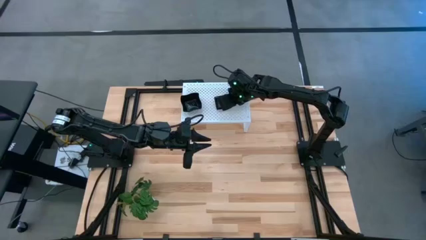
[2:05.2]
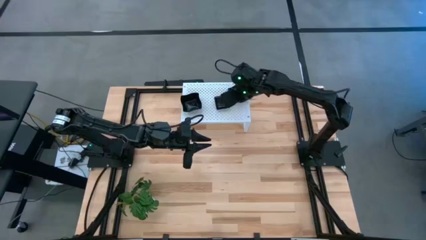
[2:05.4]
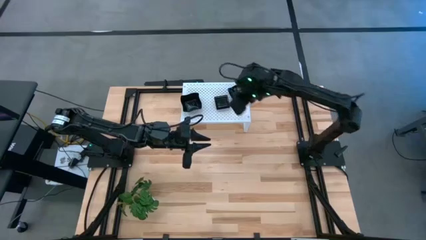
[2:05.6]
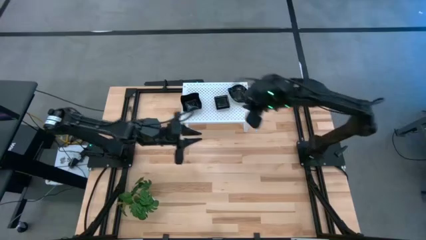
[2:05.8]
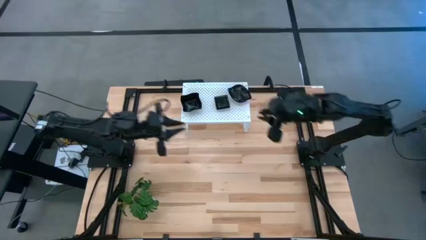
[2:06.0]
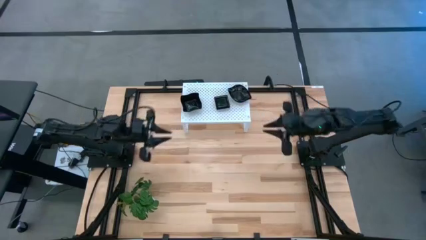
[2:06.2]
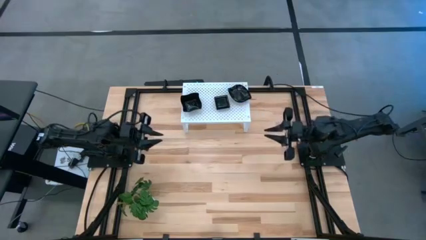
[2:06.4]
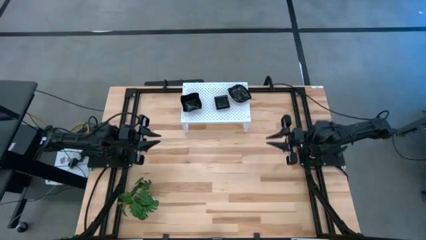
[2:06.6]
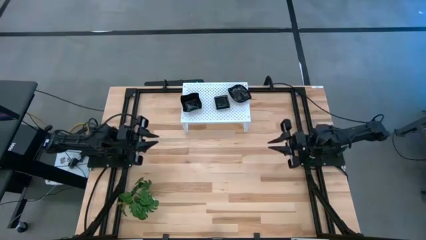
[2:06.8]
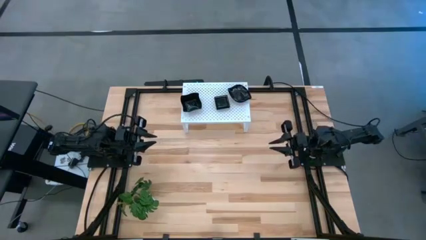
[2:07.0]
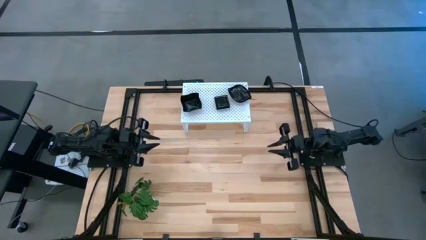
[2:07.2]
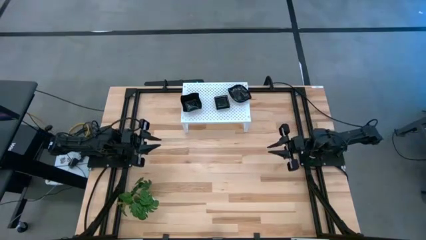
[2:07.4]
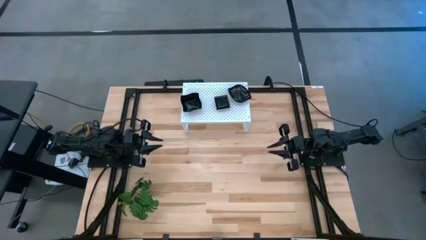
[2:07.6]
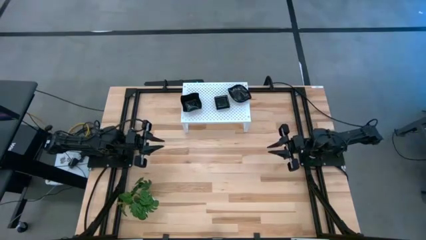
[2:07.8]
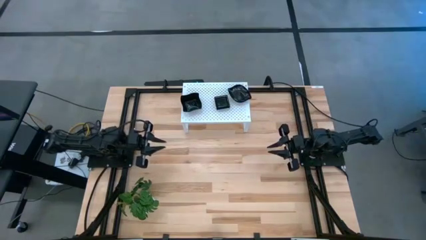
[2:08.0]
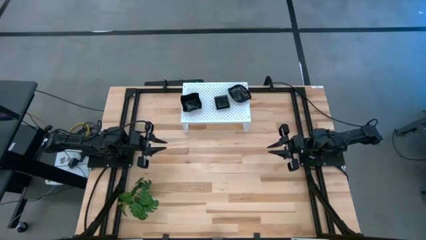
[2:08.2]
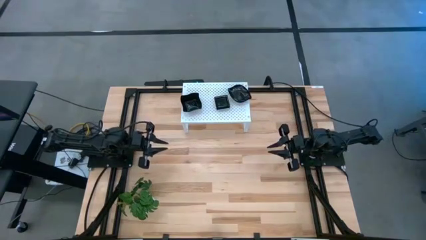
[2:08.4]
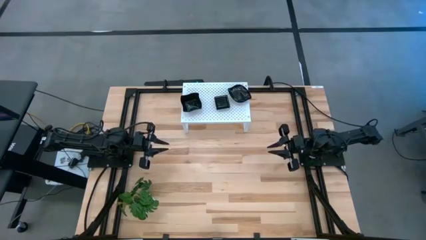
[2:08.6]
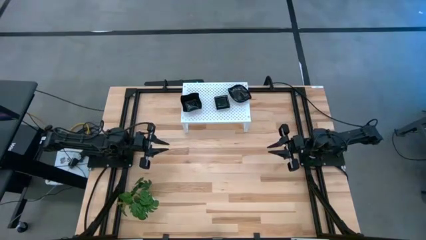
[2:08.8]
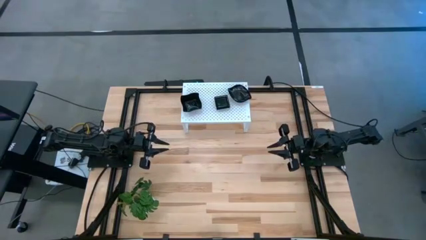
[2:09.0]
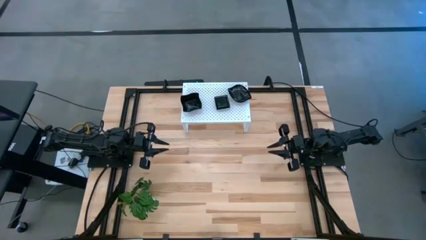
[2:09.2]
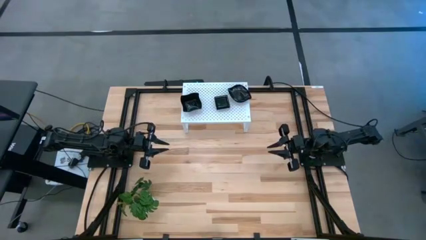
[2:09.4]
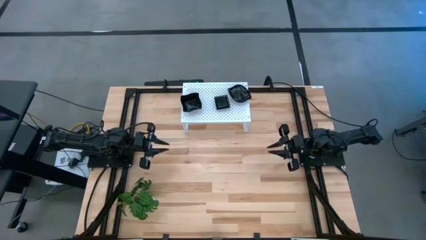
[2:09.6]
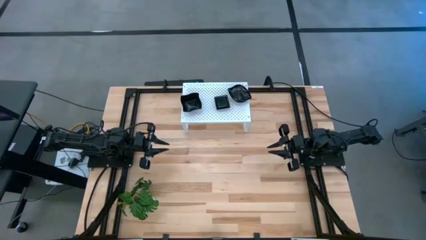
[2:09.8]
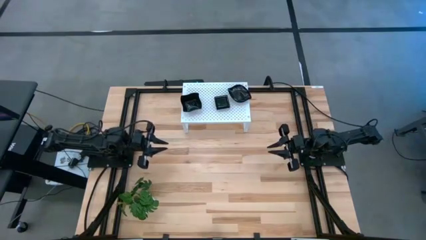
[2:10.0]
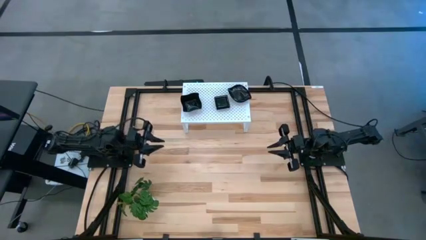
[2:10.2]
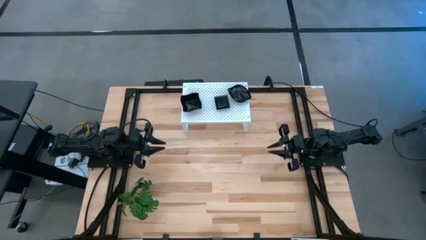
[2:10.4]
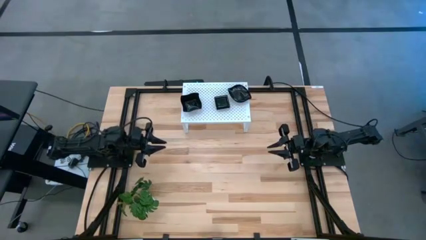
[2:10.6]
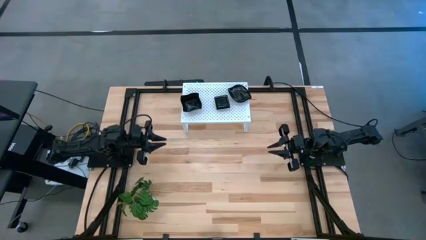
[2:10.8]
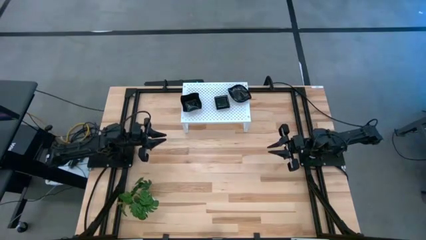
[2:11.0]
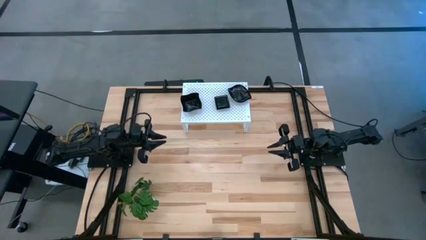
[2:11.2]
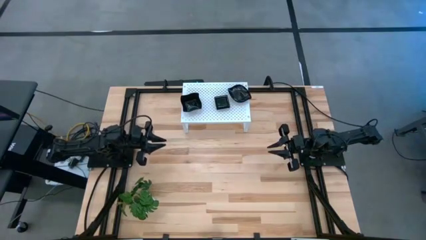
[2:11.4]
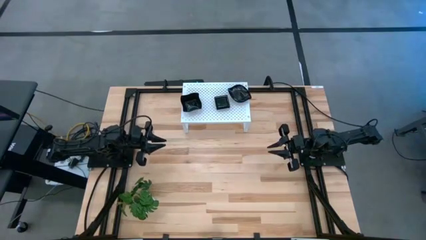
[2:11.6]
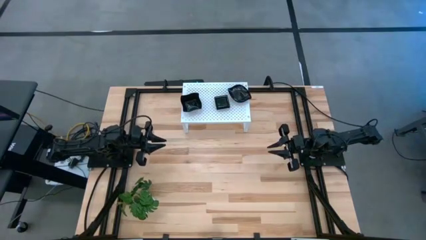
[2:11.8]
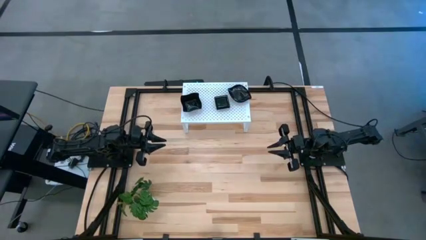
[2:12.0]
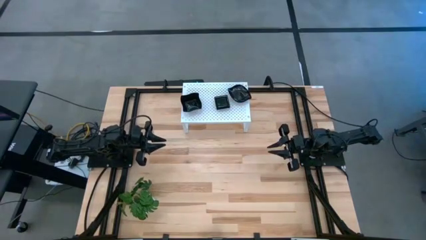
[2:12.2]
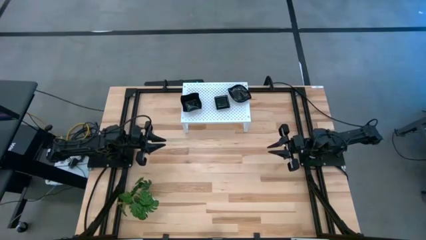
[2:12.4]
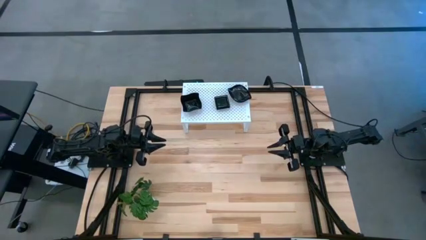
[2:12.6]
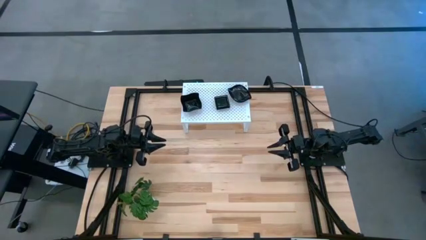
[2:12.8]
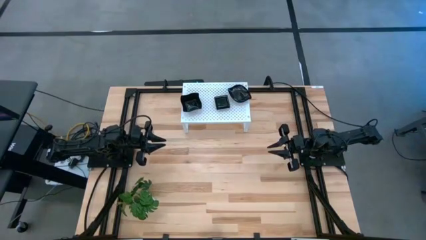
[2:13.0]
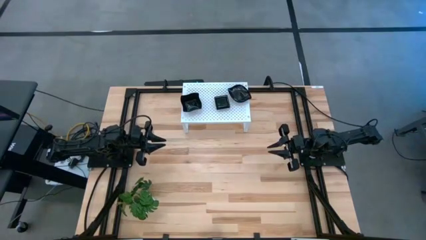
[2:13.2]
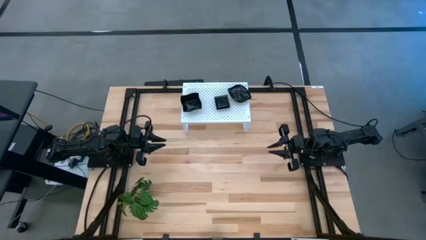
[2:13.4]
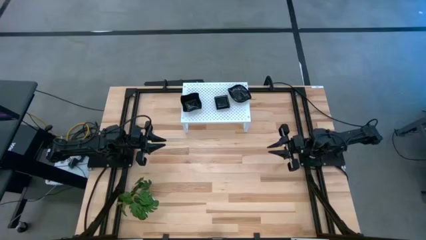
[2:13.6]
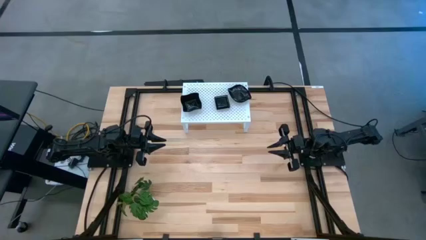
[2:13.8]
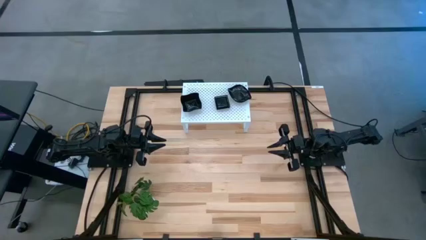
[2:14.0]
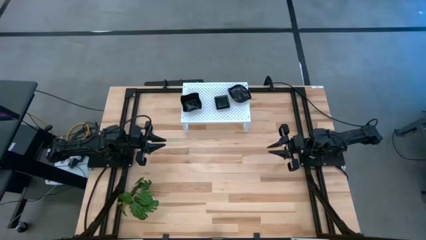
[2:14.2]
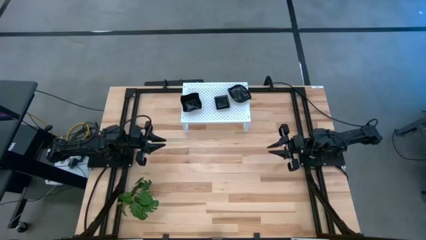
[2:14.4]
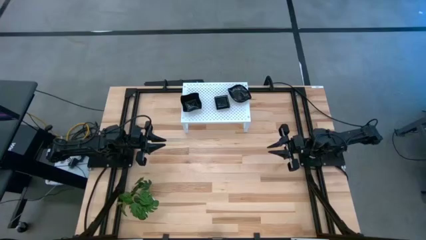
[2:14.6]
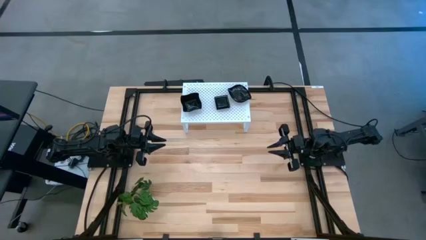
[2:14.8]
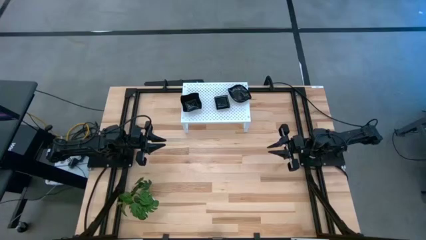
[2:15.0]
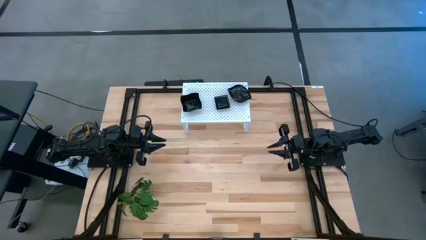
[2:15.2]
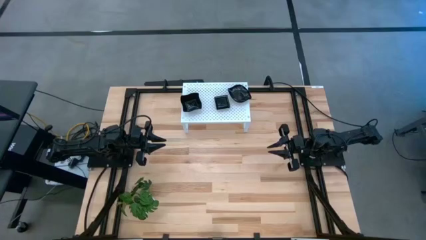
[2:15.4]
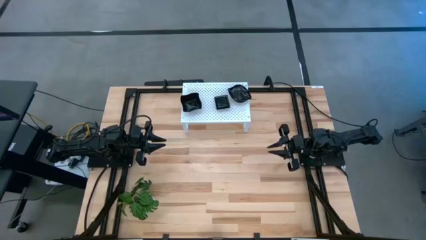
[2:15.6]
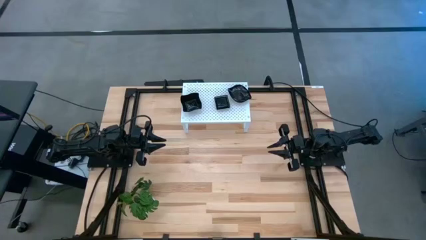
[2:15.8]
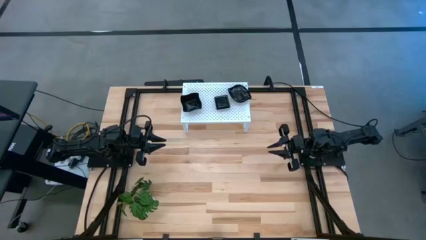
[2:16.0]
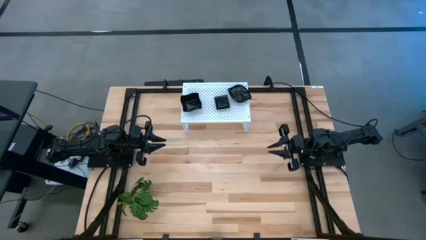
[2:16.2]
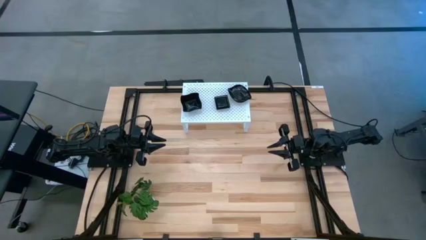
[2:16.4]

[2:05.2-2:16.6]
Task: Pick & Place Mini shaped plates
Return to Home Position
